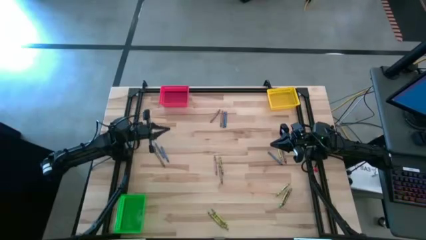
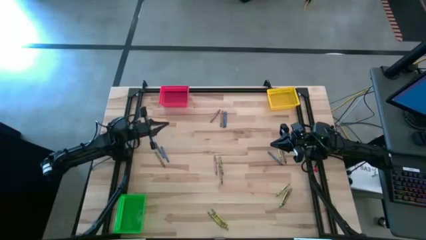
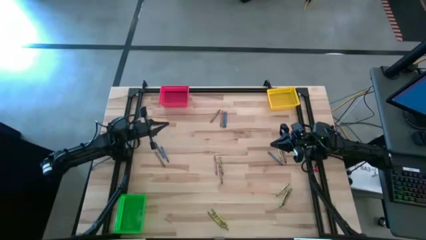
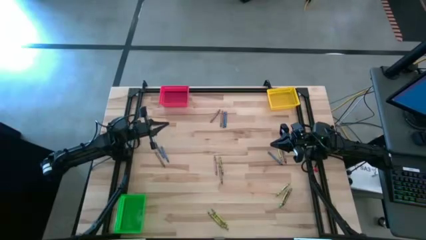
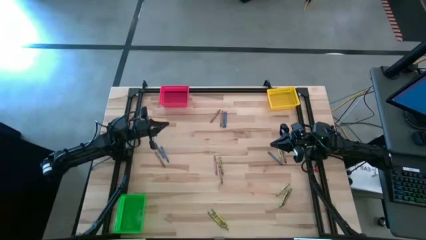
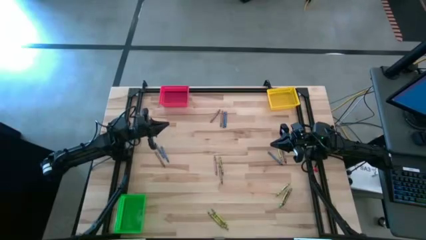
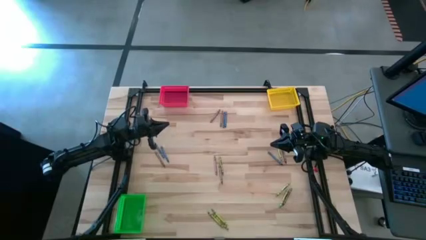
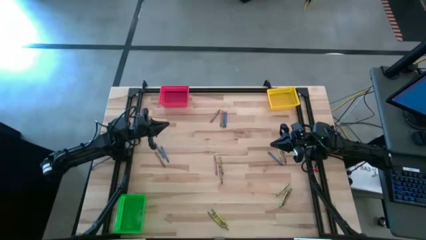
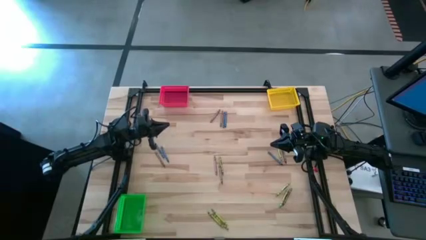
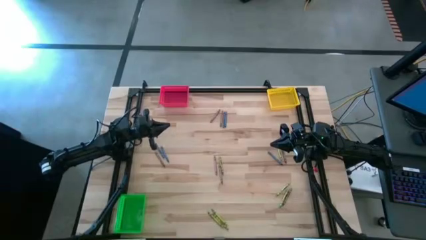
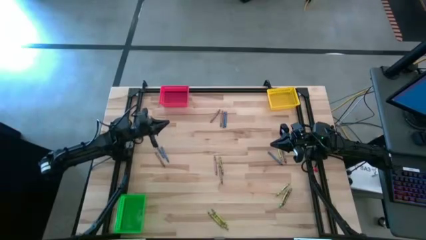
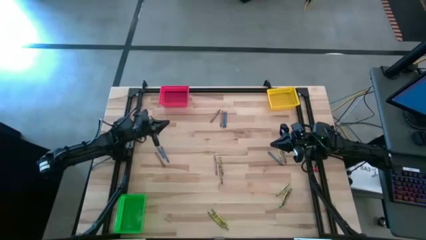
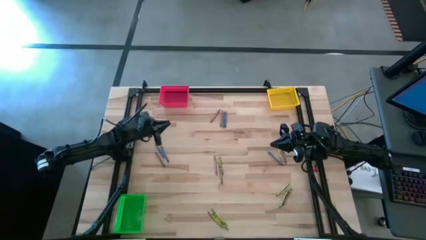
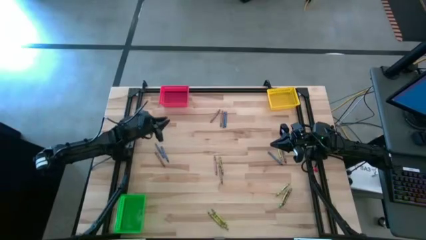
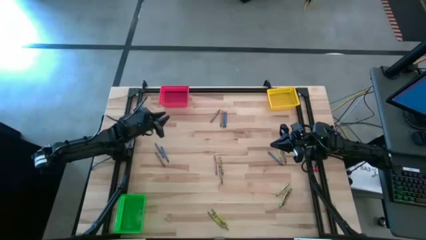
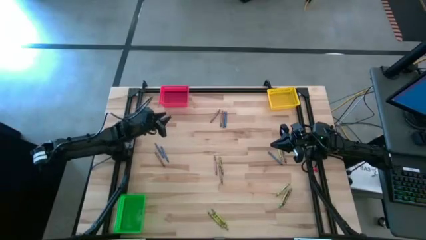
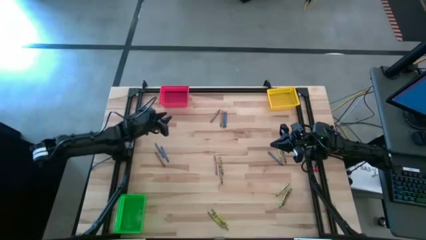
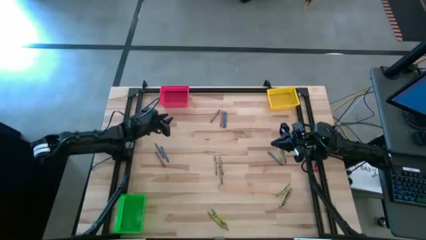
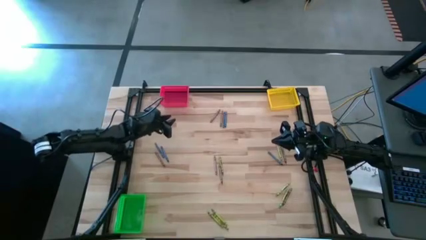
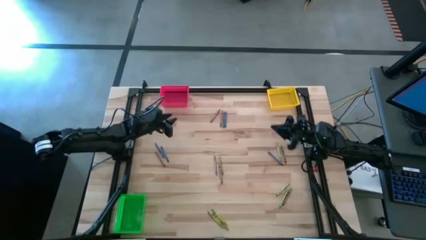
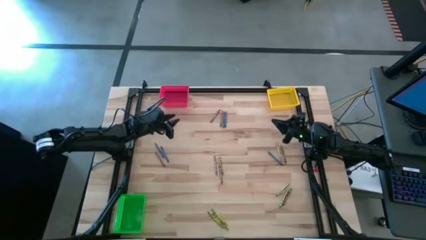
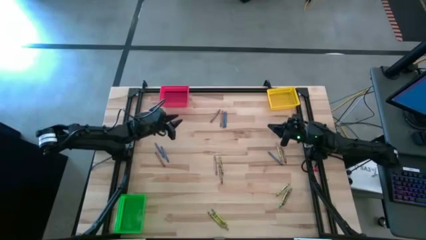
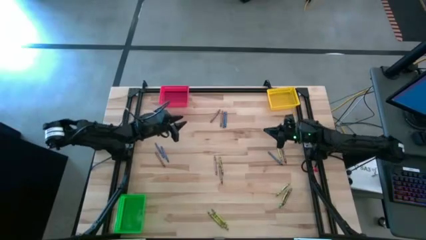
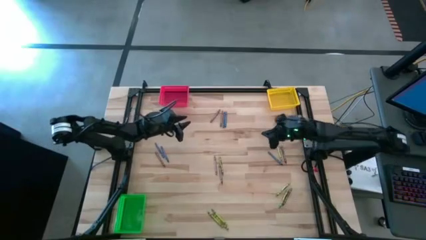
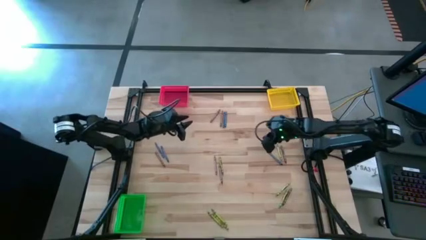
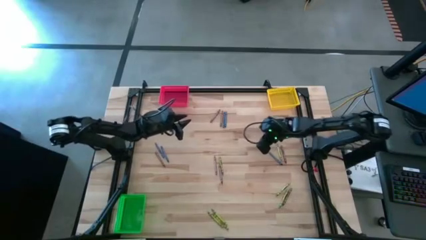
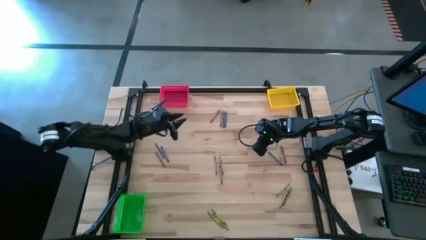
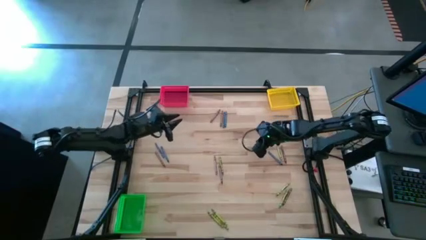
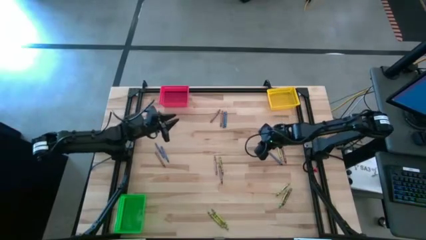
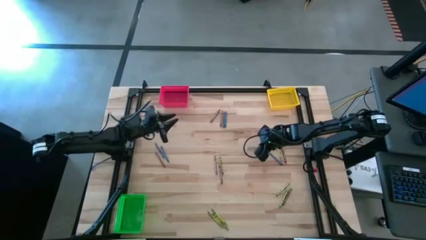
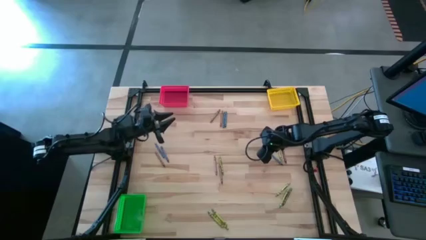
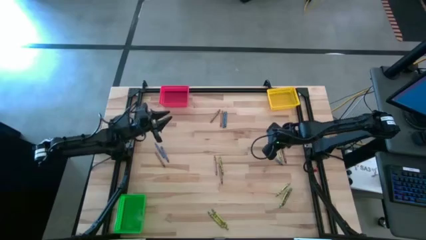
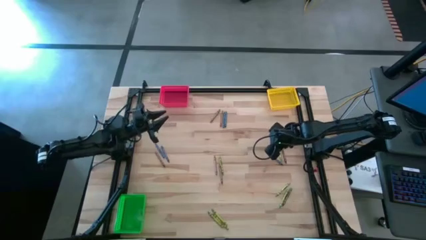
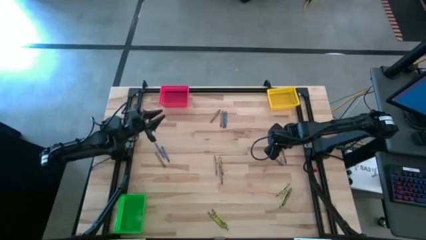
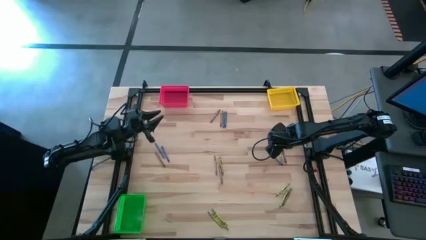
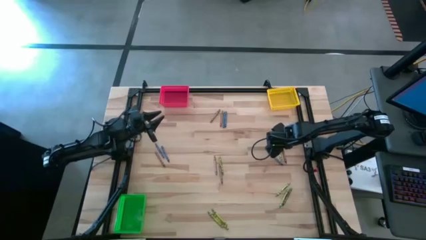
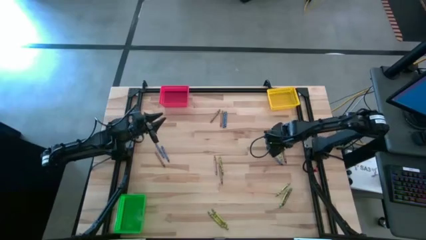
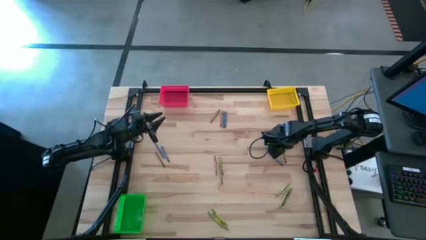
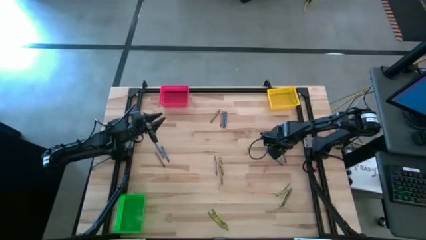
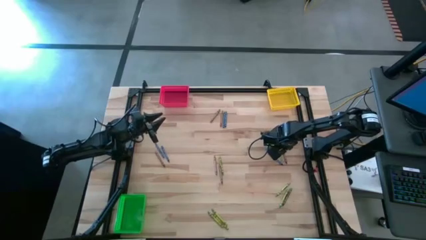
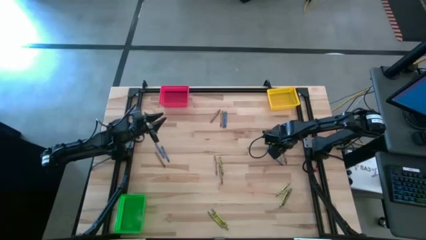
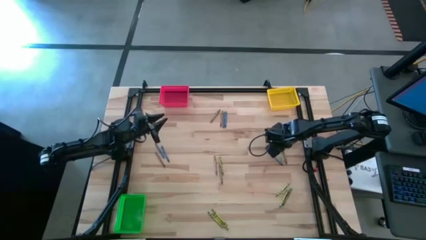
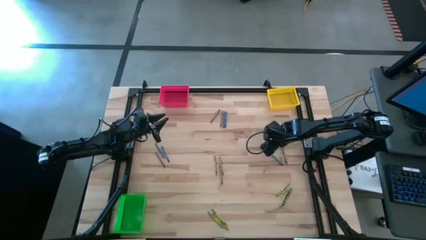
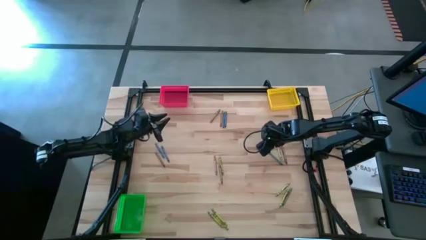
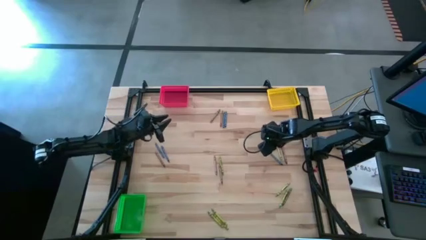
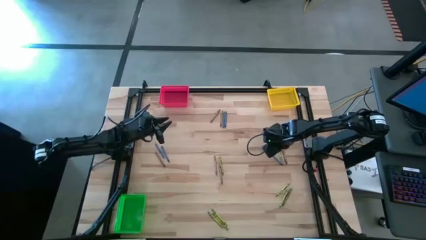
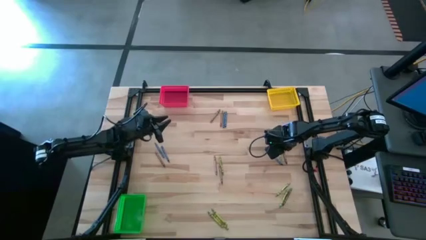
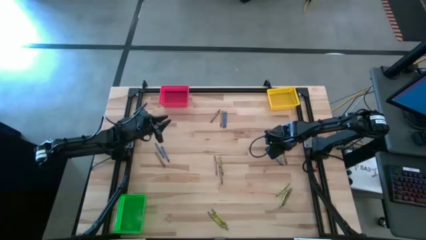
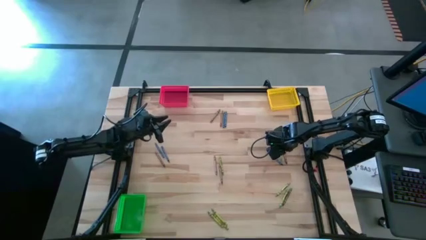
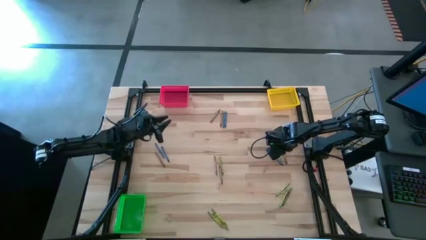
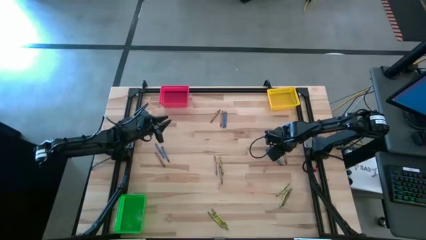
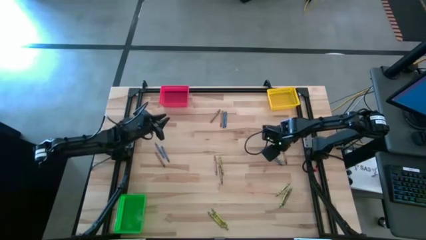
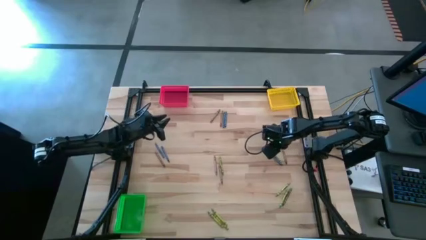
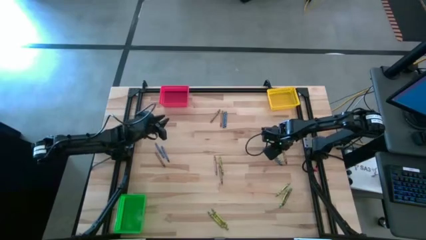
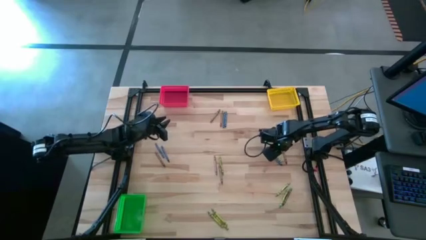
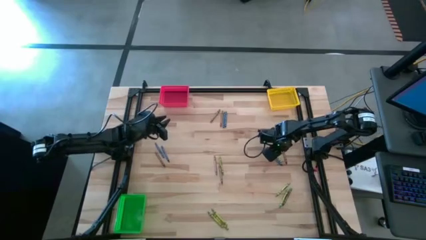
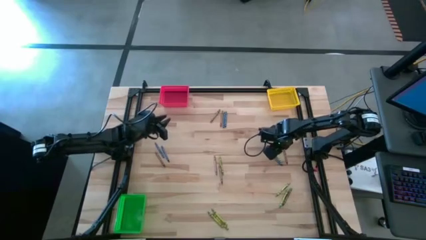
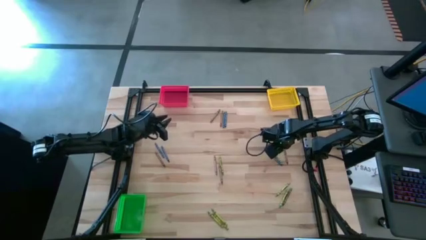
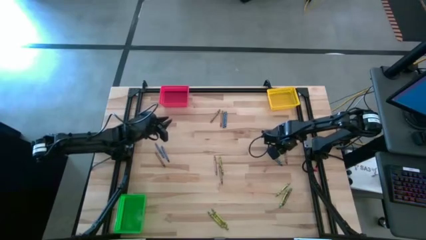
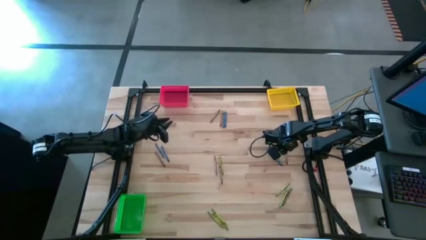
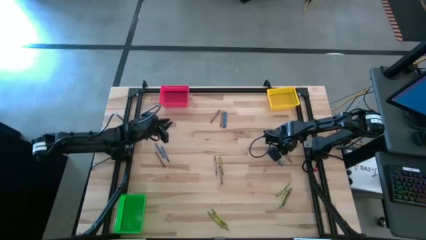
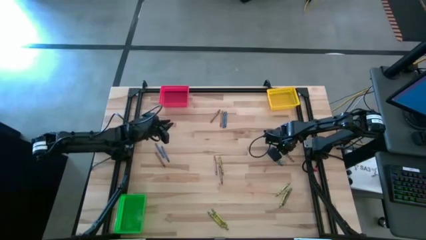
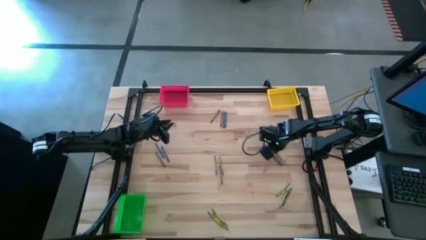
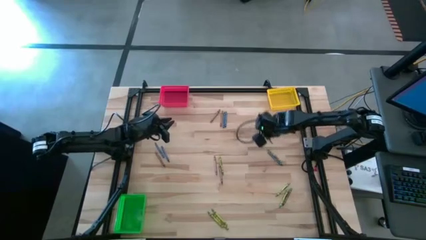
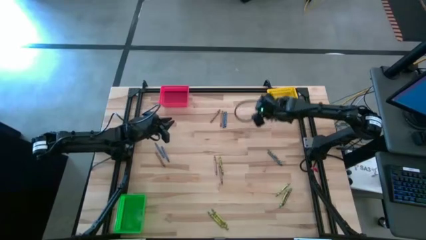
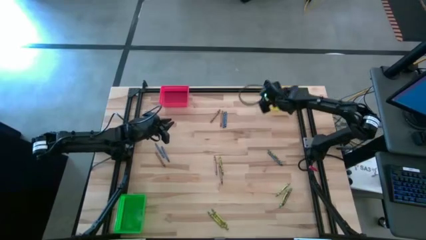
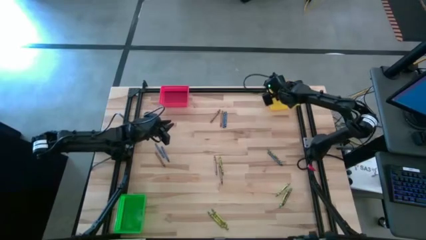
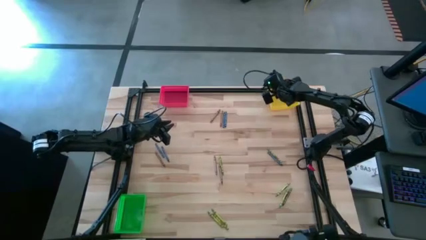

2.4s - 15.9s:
Task: Sort crayons
Put the brown crayon into the yellow bin

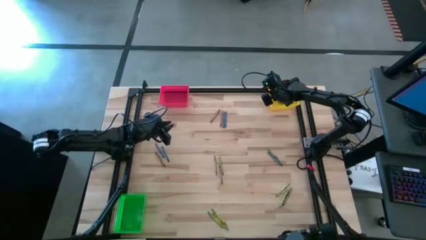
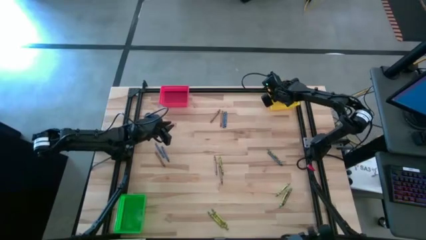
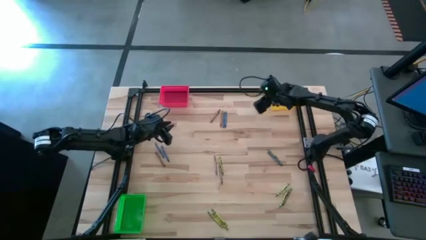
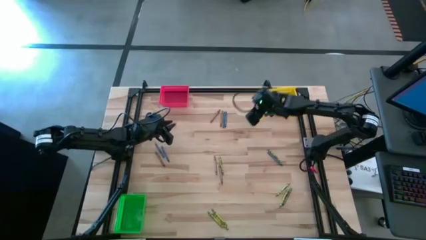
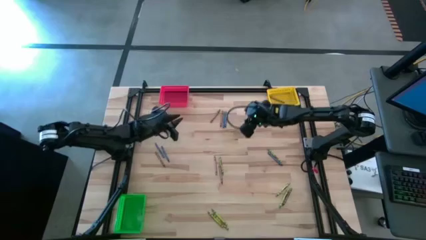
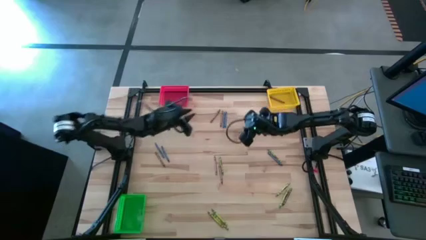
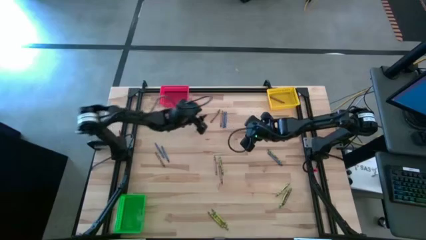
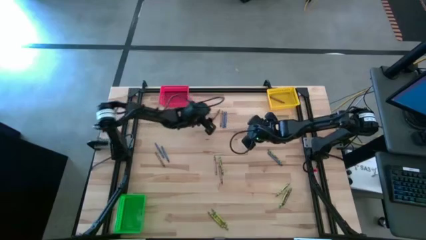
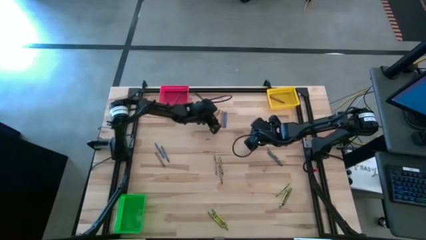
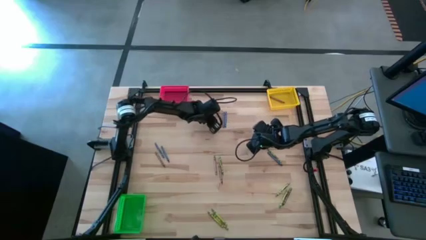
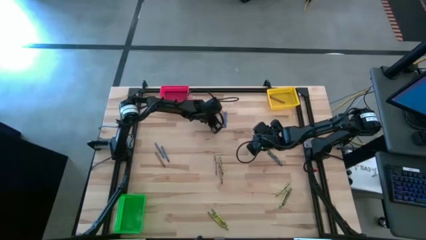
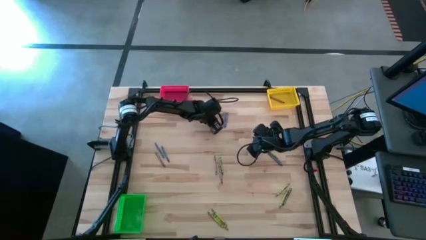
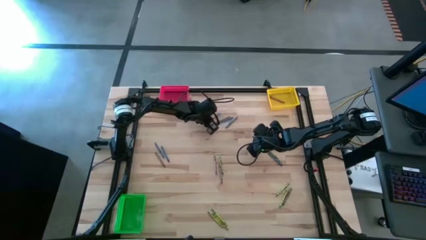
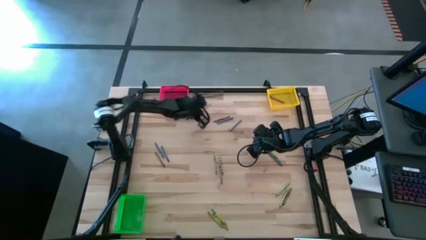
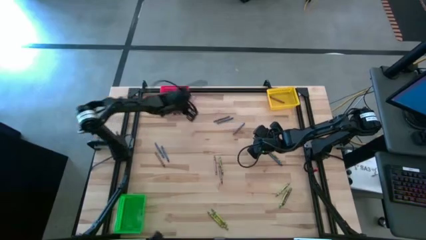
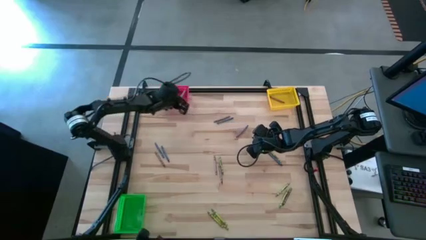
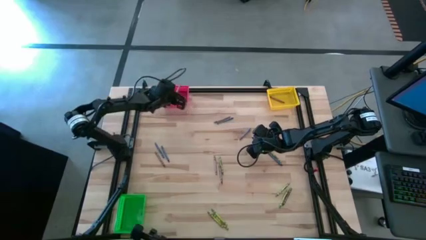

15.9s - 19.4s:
Put the brown crayon into the red bin
